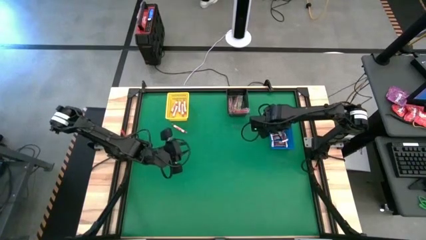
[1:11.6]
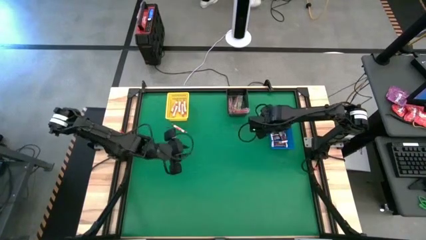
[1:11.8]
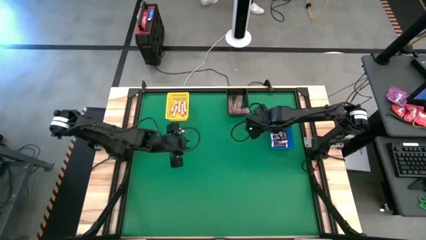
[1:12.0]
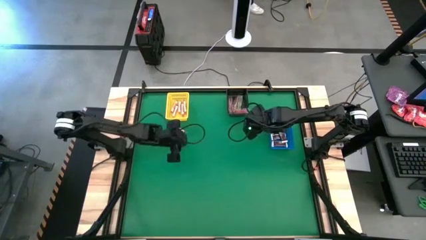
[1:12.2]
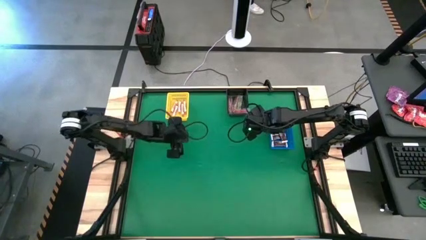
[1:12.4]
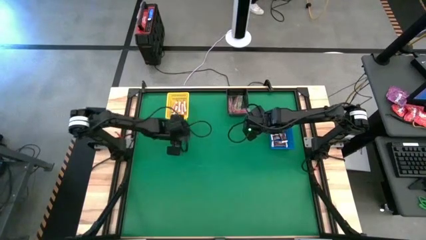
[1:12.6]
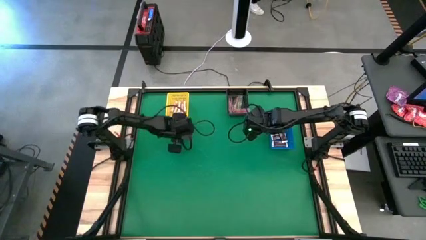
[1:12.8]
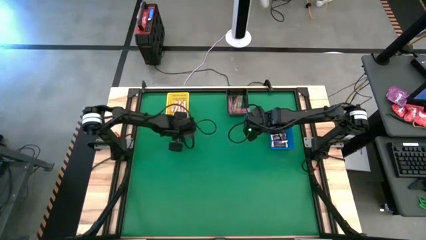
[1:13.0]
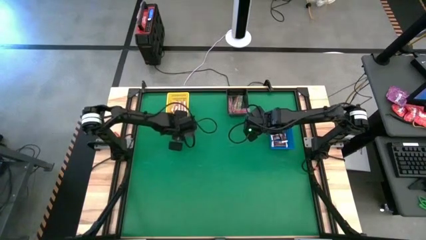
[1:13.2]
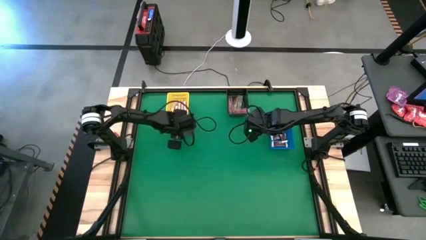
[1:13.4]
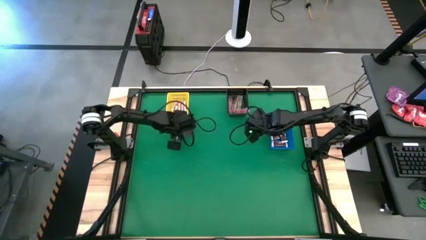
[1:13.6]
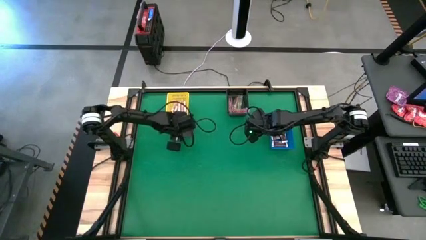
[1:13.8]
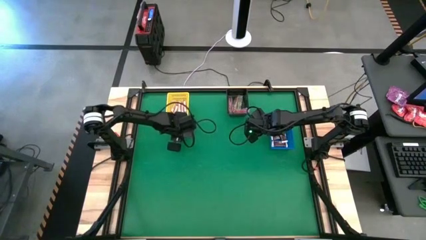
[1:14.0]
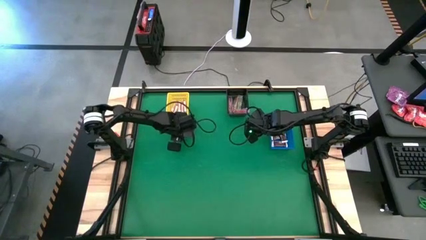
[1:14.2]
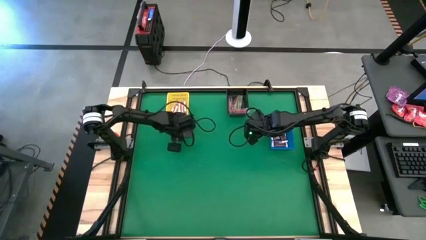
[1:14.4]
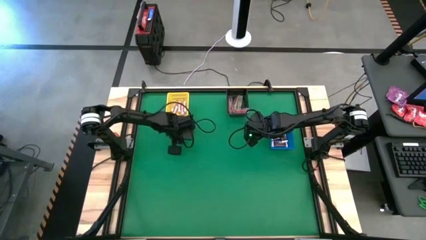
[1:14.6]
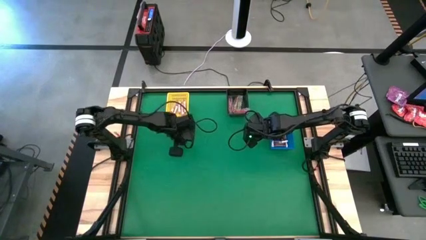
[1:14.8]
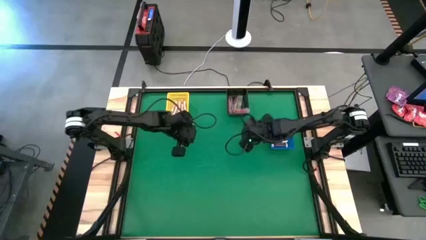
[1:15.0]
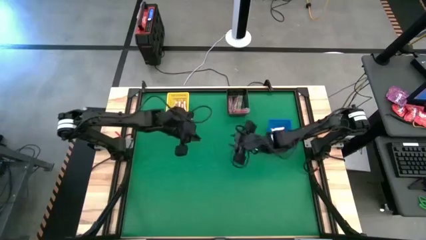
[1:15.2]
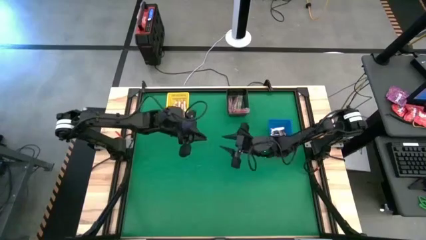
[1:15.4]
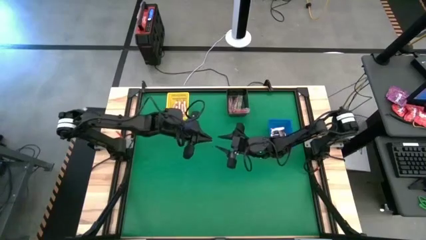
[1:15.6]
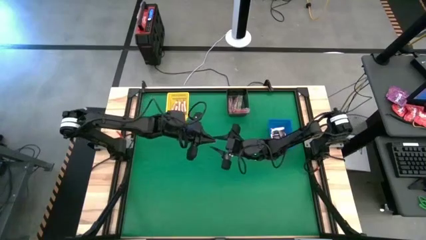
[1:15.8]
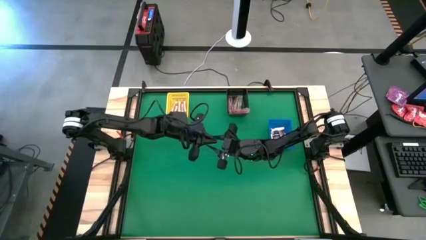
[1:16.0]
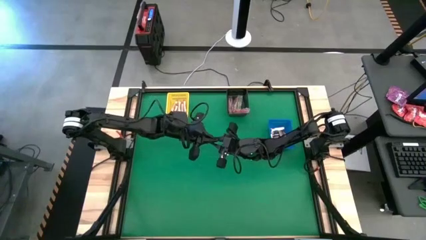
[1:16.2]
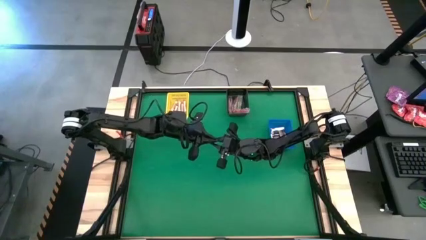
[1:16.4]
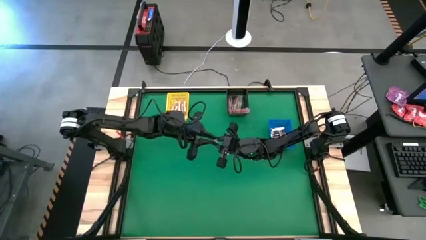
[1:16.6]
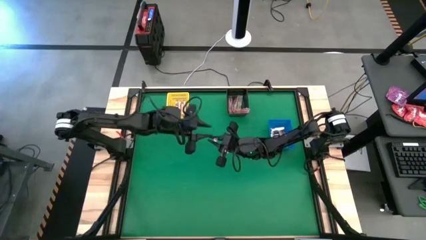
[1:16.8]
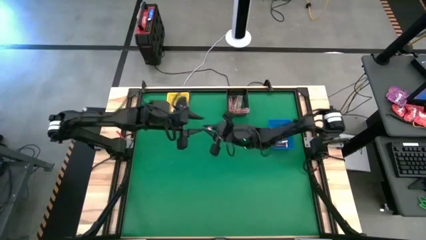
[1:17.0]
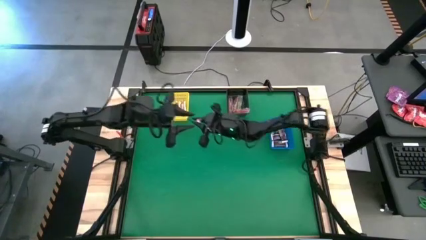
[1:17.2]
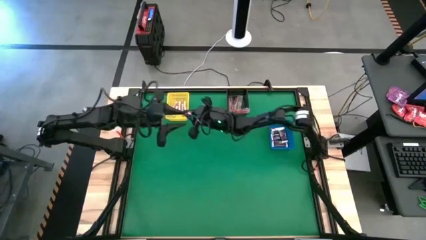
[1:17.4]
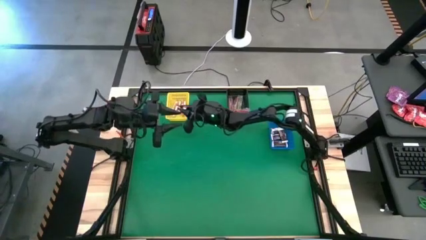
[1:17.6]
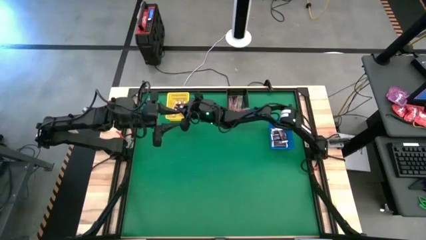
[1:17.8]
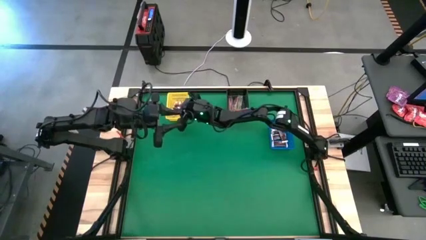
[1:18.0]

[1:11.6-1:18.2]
Task: Sort candy by brand, put in halloween buckets
Put the pink candy into the yellow basket

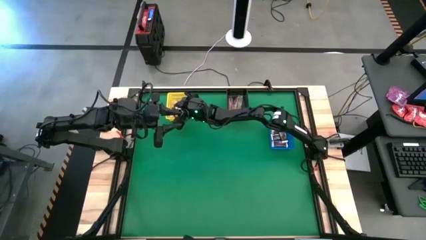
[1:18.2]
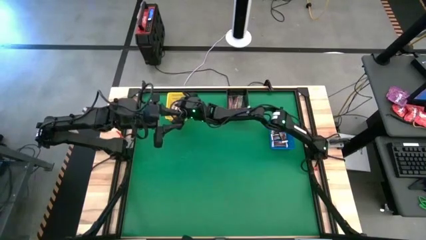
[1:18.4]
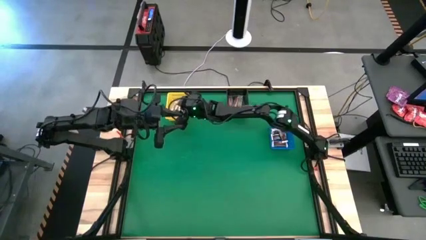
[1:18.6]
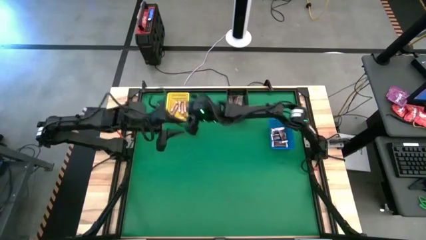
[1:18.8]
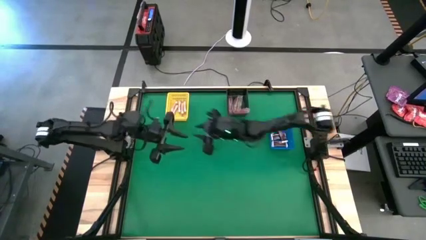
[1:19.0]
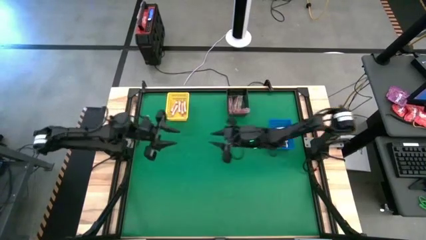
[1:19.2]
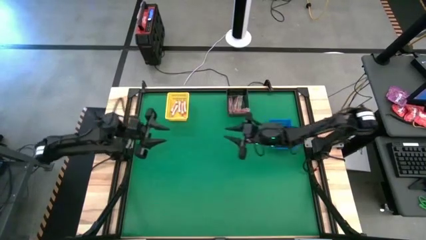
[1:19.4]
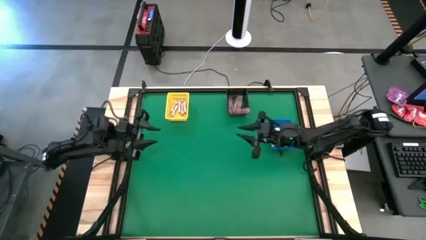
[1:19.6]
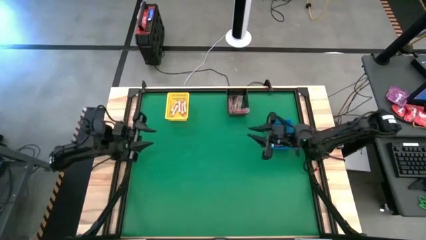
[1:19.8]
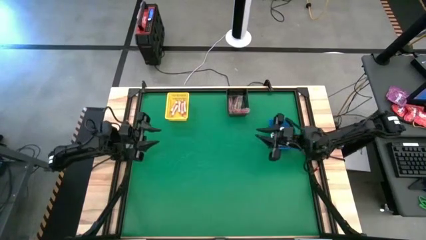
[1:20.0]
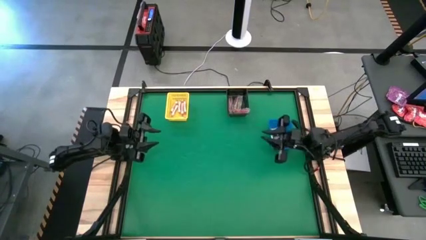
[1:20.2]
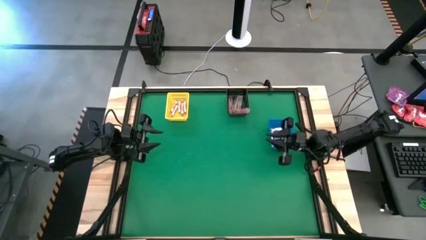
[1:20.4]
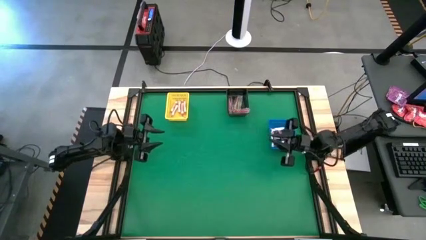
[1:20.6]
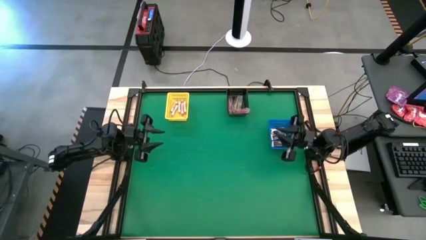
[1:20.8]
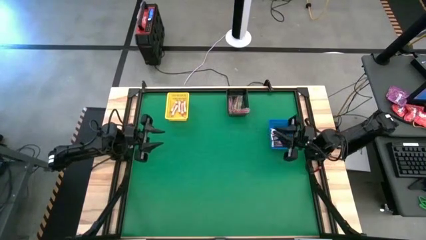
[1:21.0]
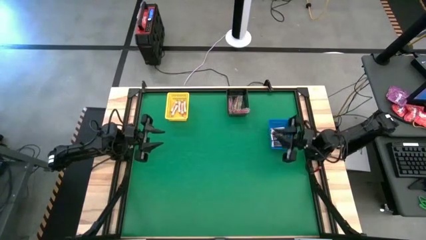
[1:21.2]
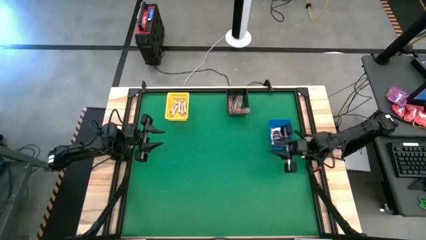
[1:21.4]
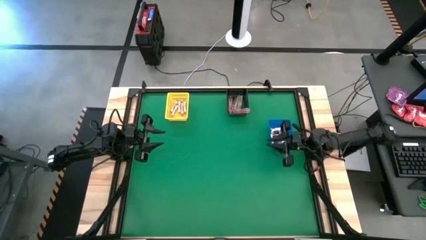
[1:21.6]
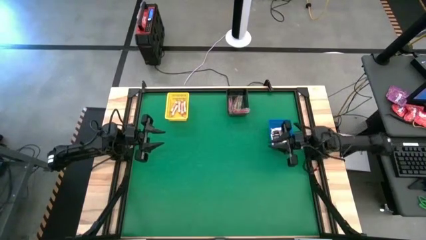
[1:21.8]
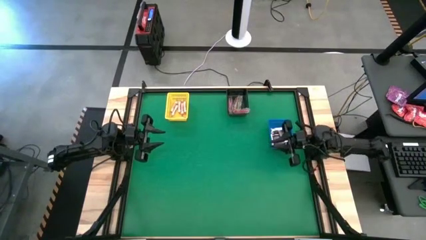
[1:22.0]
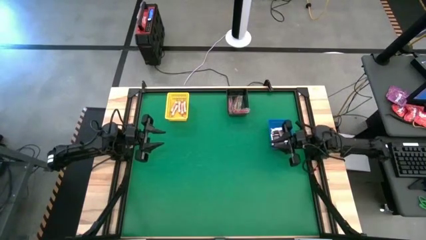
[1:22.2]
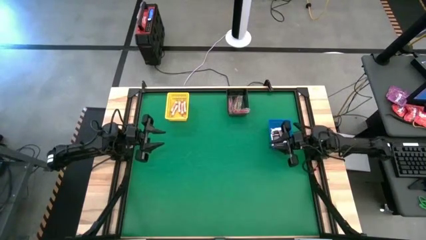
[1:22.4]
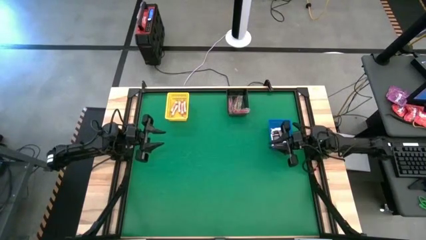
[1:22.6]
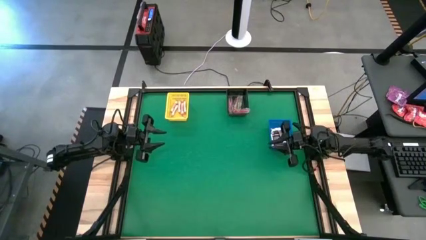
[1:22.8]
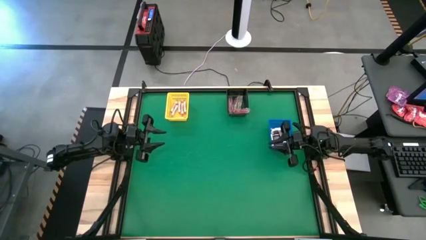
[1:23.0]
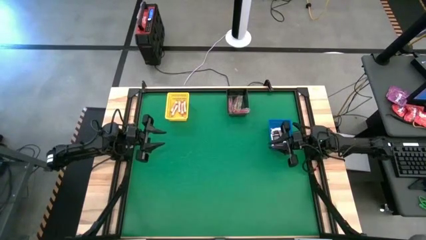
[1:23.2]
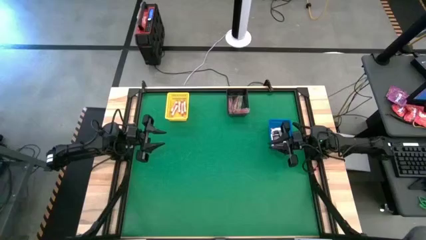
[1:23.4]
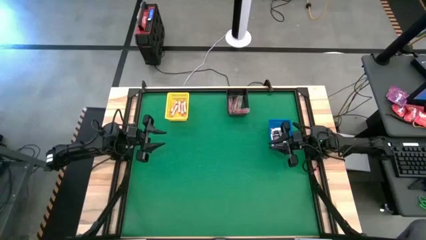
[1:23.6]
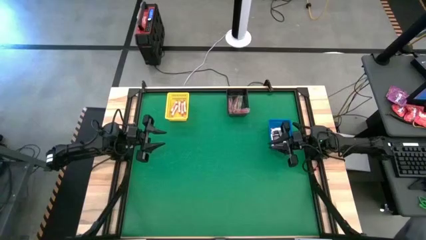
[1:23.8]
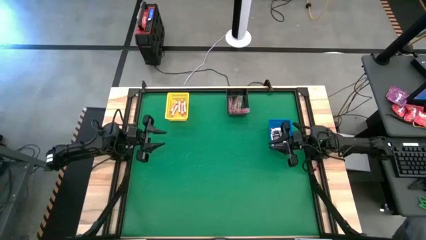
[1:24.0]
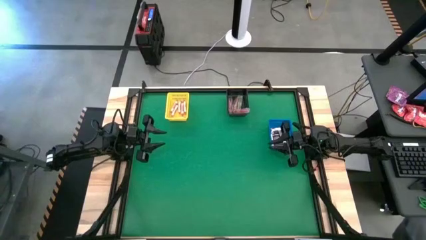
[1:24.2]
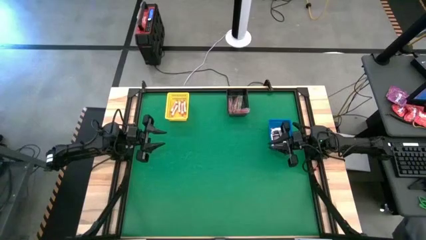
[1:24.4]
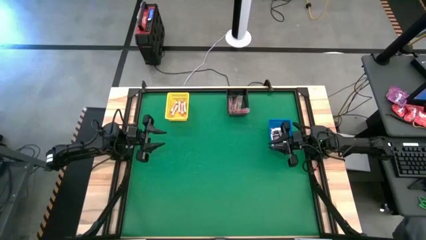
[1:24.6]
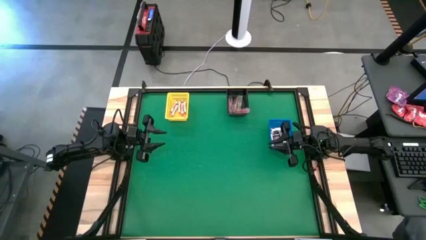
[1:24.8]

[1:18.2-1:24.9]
Return to Home Position

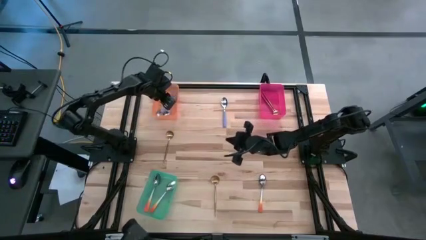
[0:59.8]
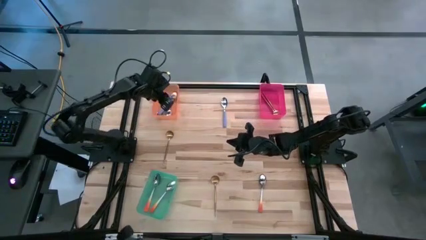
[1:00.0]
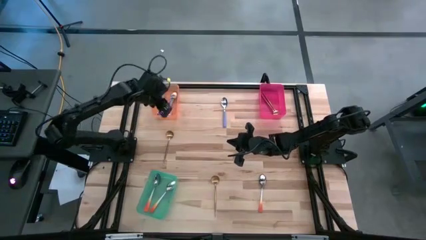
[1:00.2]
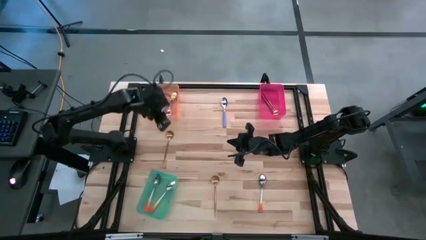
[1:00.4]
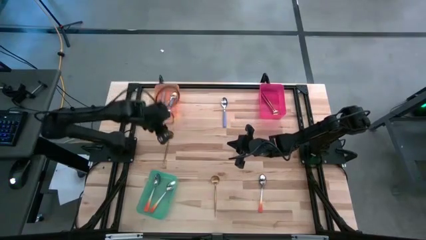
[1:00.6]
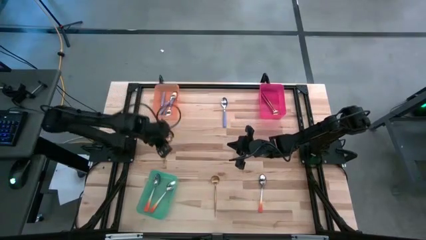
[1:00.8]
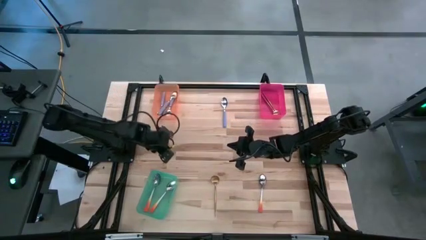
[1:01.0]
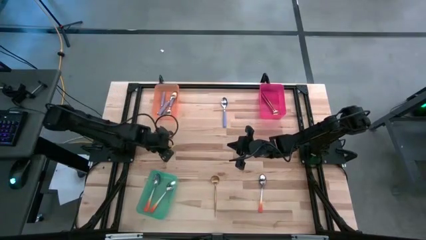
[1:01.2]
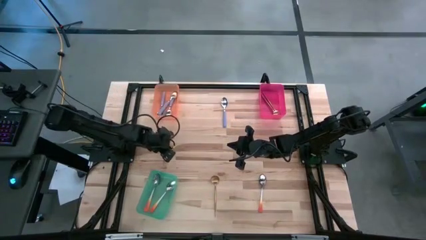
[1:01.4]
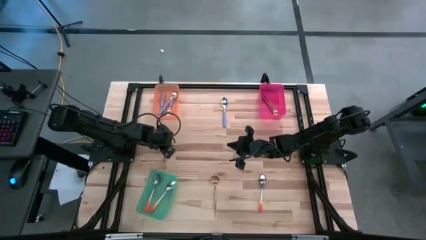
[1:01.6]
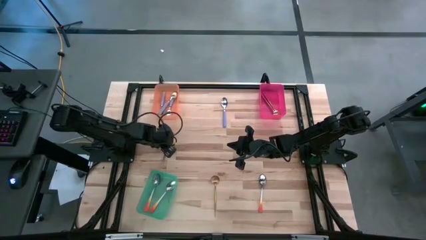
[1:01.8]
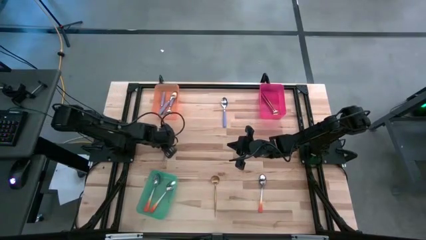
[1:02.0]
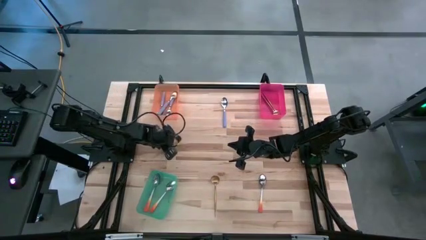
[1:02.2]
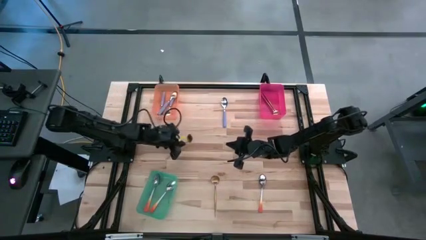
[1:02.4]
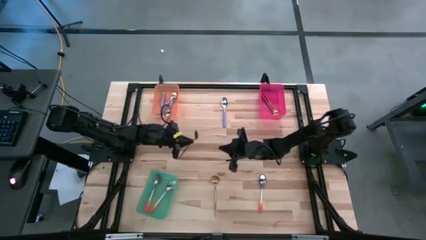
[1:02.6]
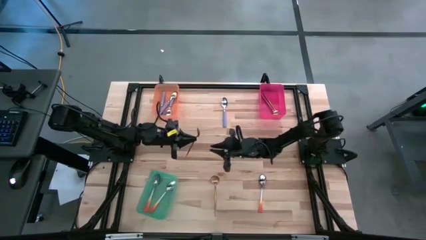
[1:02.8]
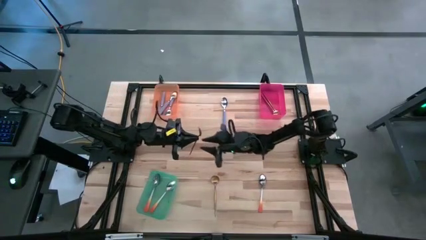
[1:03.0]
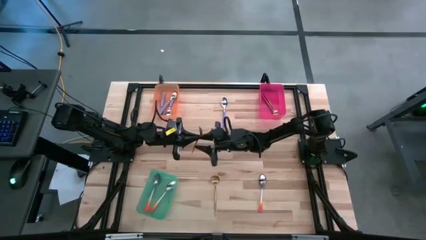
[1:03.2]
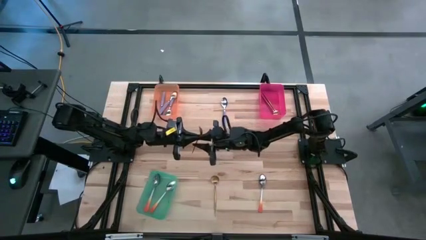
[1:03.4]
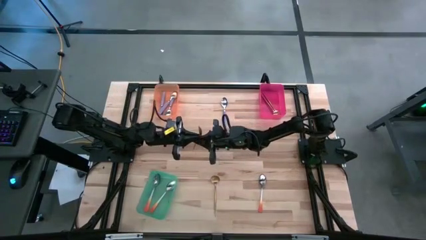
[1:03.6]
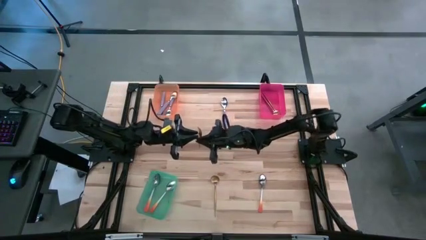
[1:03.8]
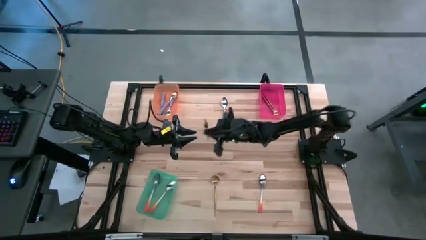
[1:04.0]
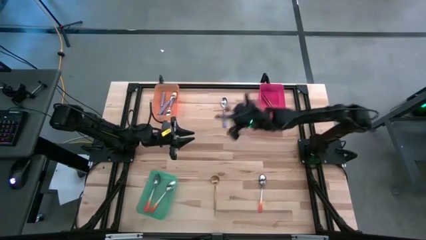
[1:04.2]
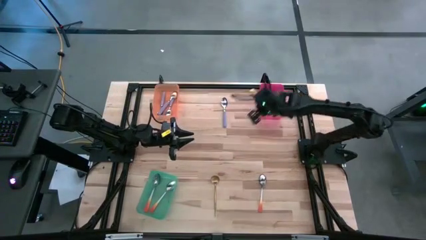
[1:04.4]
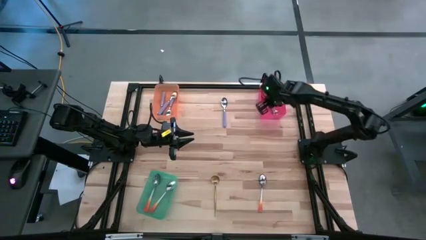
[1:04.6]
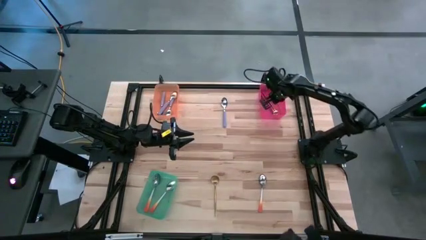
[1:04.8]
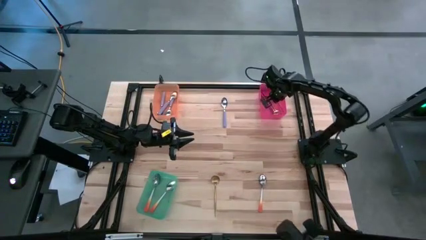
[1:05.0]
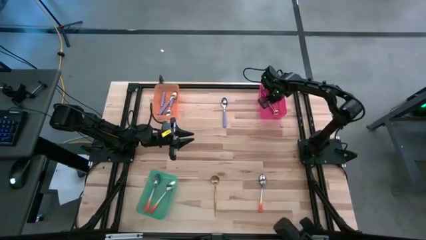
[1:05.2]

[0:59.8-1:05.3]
Task: Sort silverware by color (type)
Put the gold spoon into the pink bin
